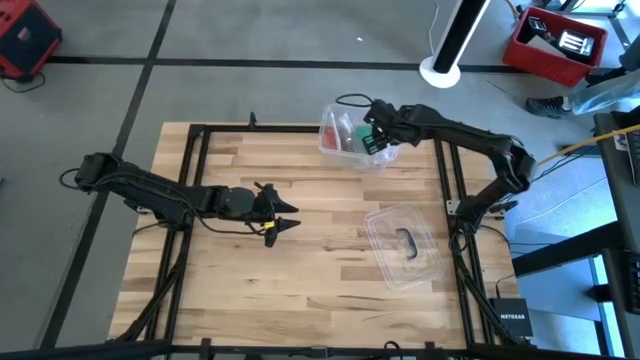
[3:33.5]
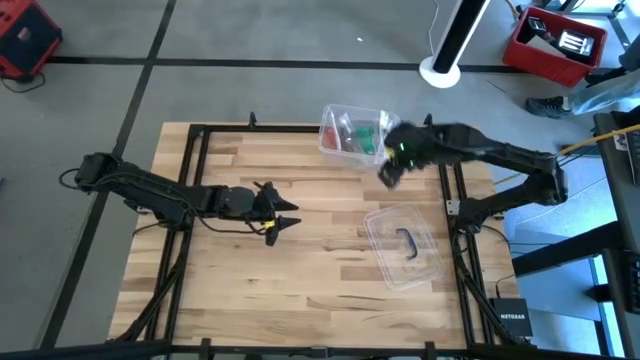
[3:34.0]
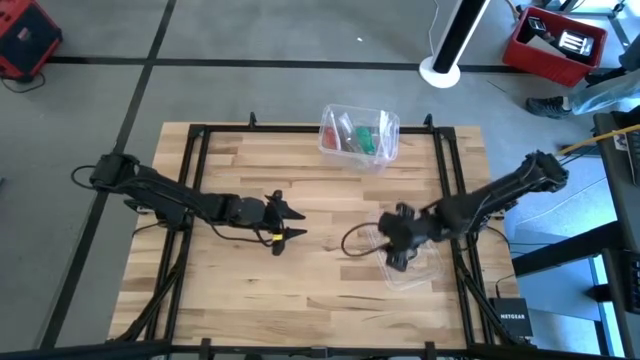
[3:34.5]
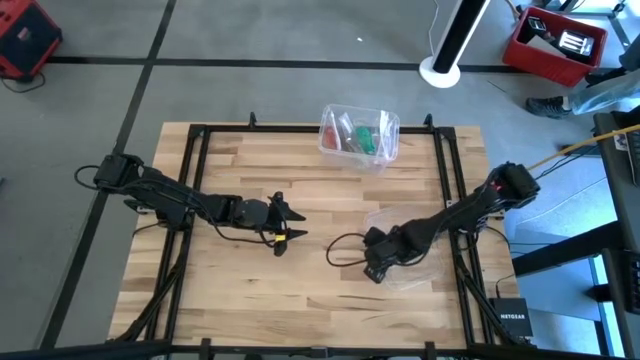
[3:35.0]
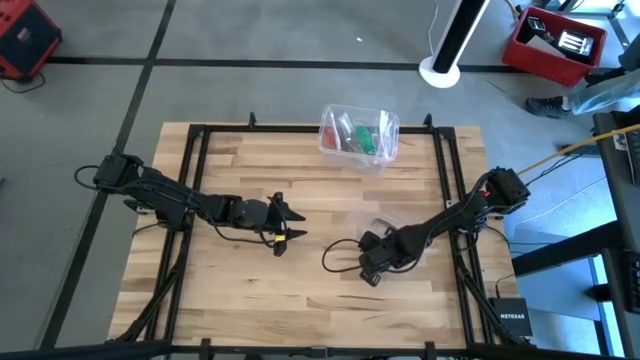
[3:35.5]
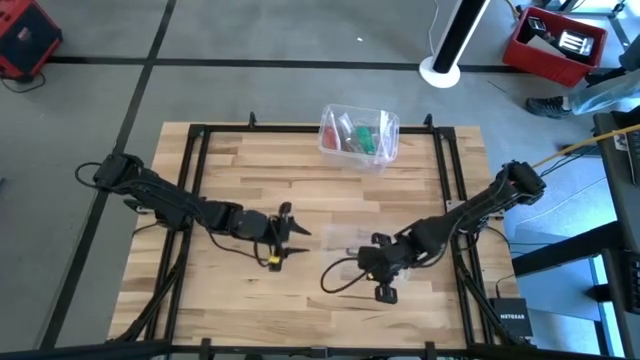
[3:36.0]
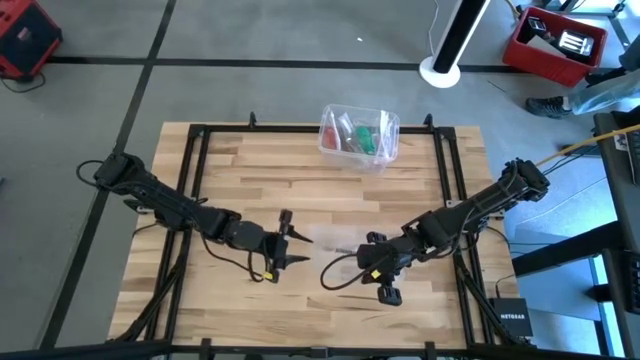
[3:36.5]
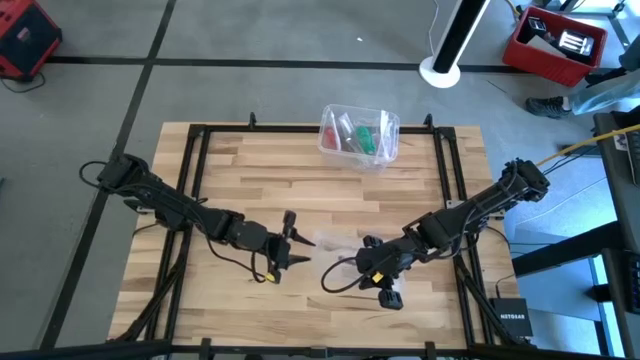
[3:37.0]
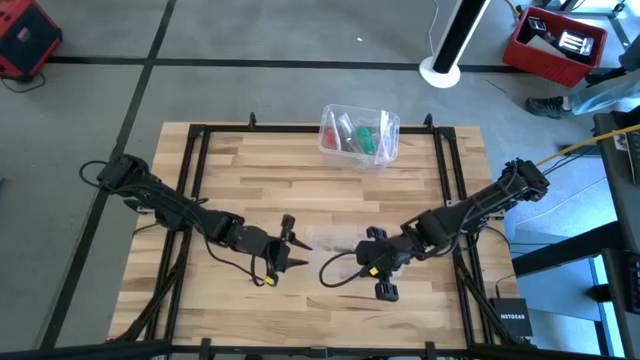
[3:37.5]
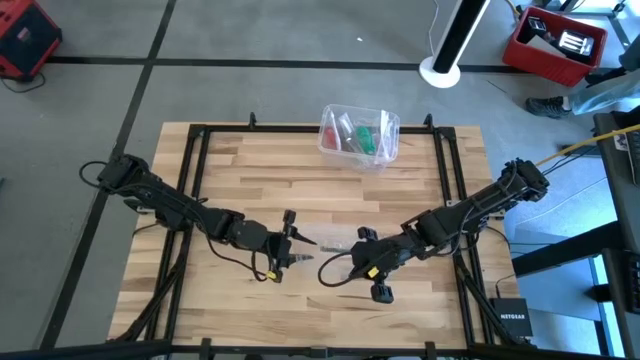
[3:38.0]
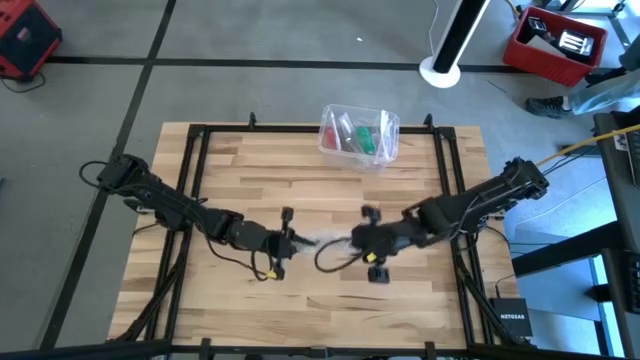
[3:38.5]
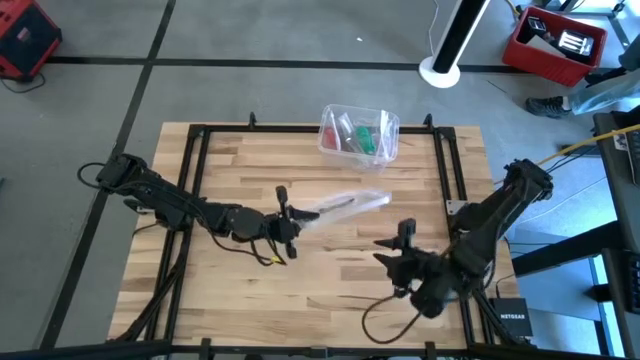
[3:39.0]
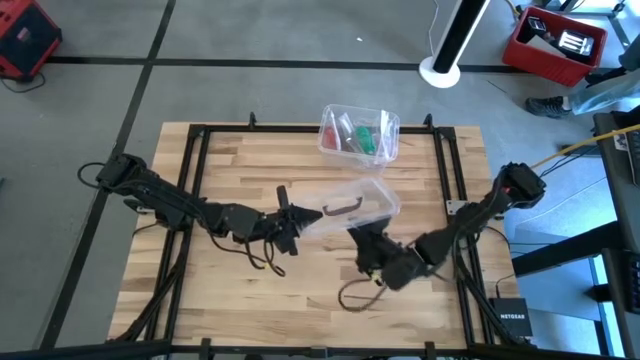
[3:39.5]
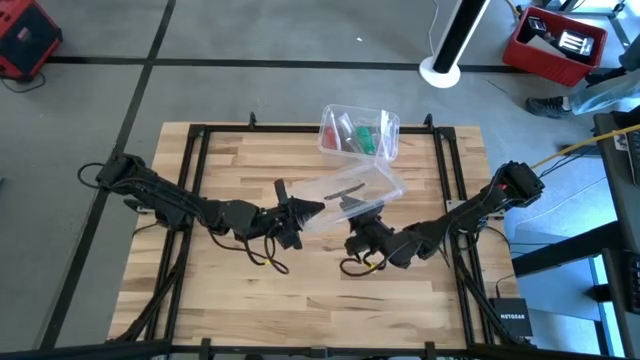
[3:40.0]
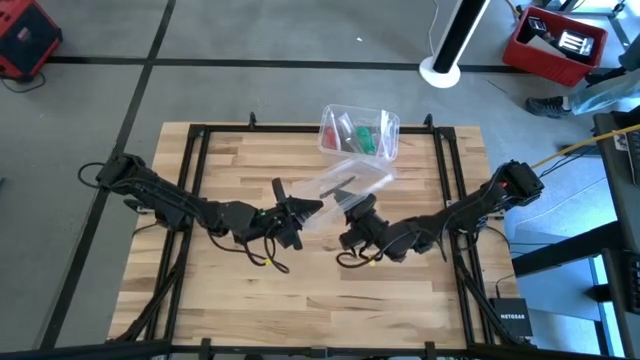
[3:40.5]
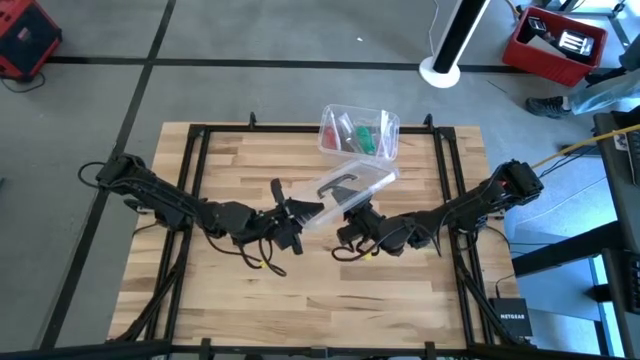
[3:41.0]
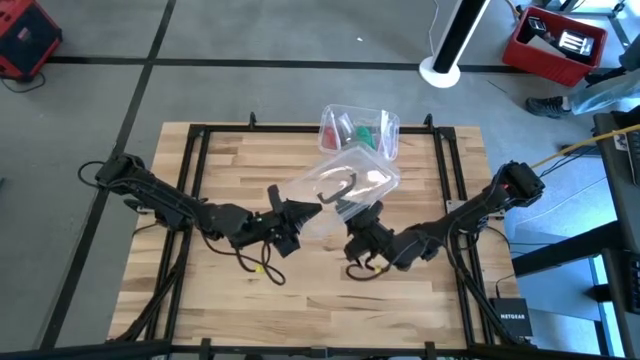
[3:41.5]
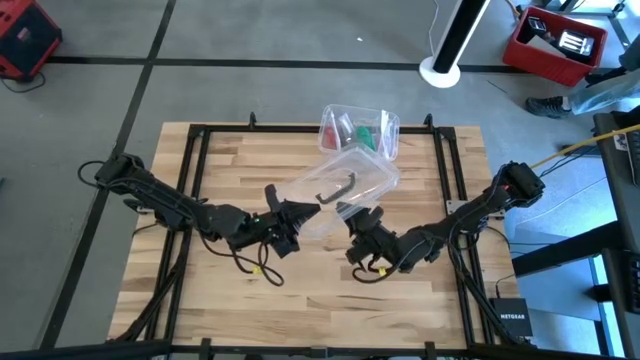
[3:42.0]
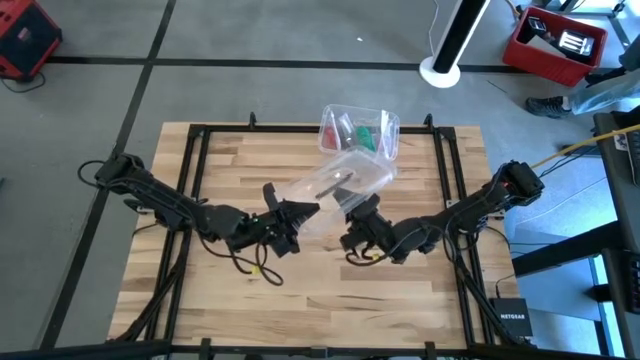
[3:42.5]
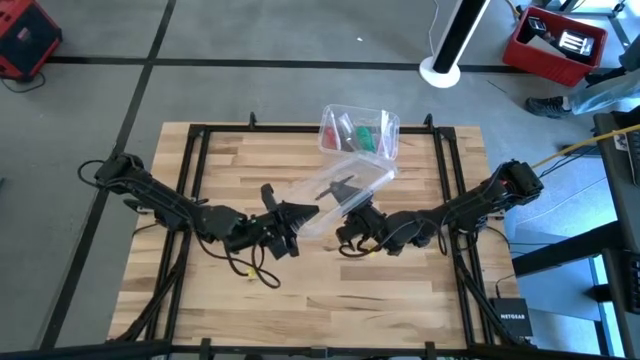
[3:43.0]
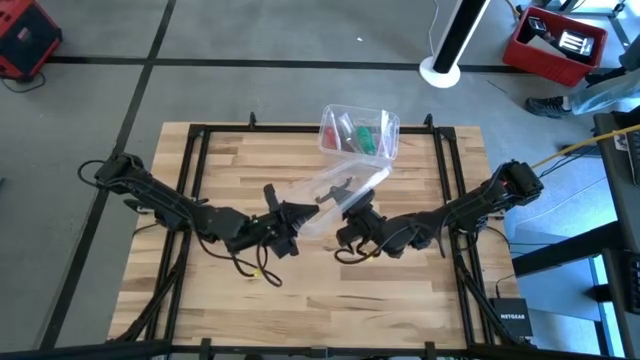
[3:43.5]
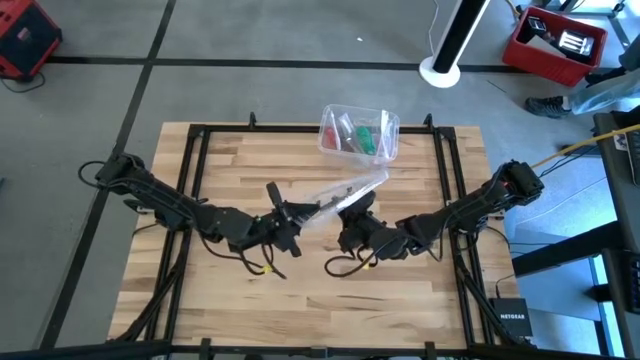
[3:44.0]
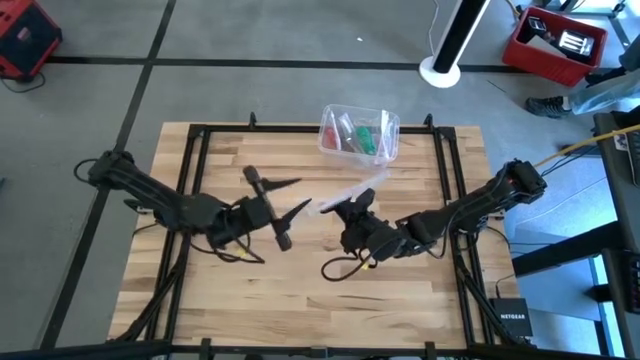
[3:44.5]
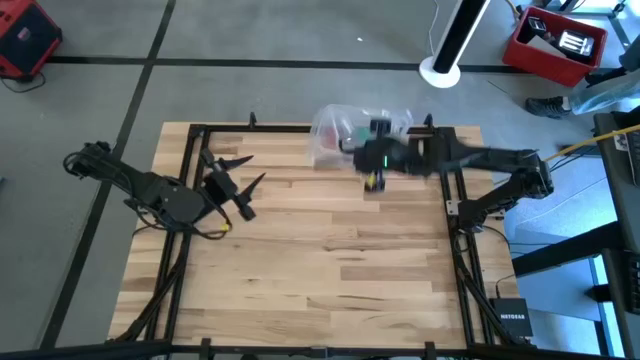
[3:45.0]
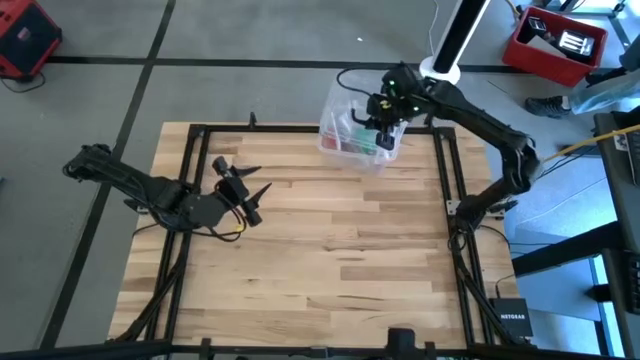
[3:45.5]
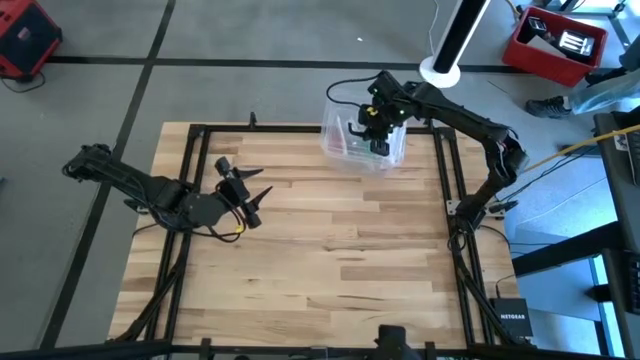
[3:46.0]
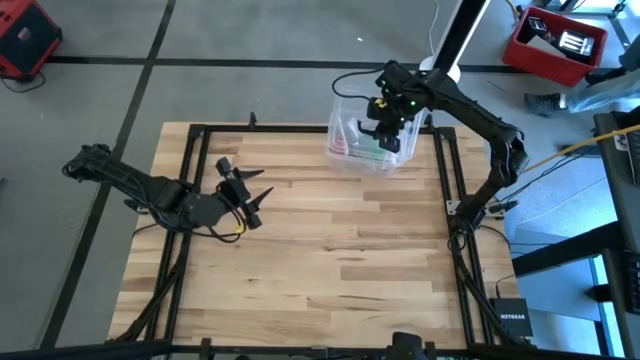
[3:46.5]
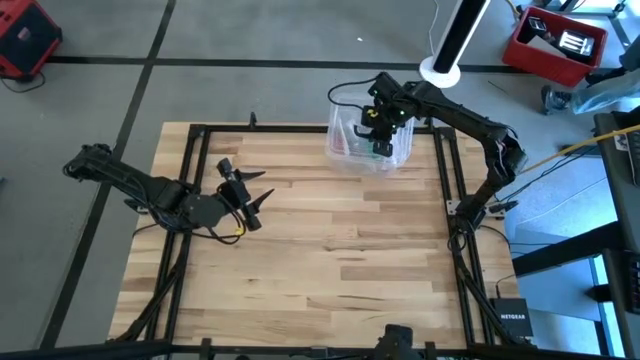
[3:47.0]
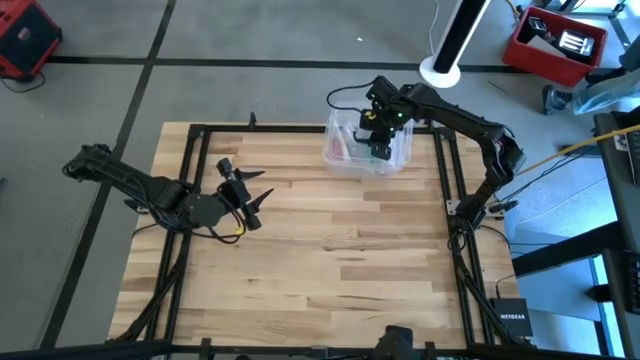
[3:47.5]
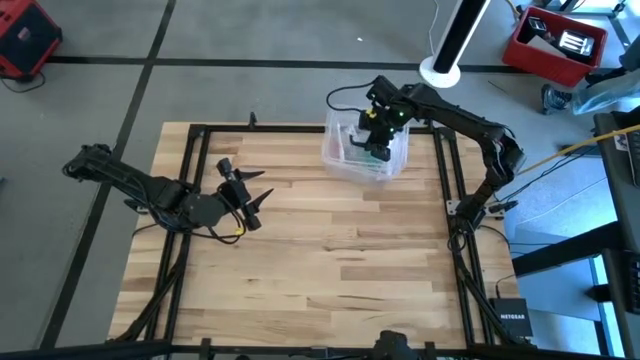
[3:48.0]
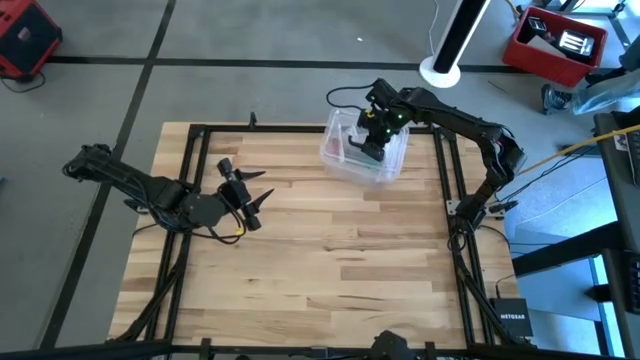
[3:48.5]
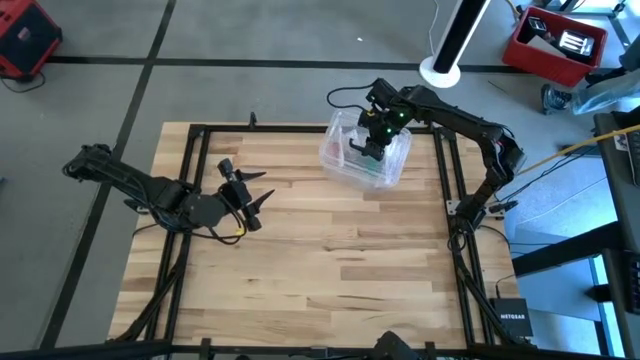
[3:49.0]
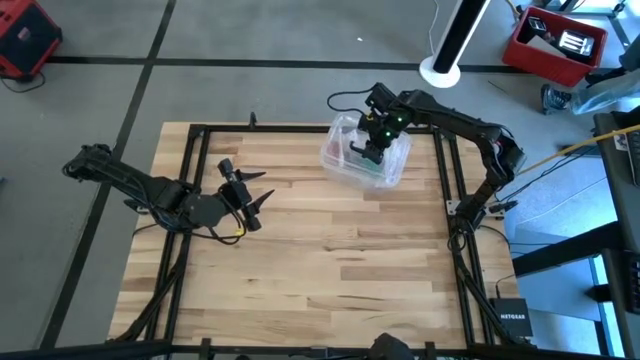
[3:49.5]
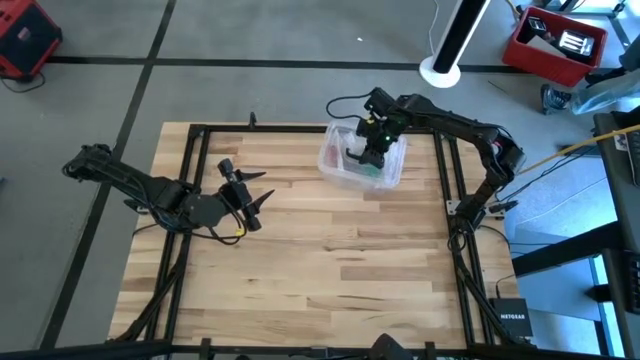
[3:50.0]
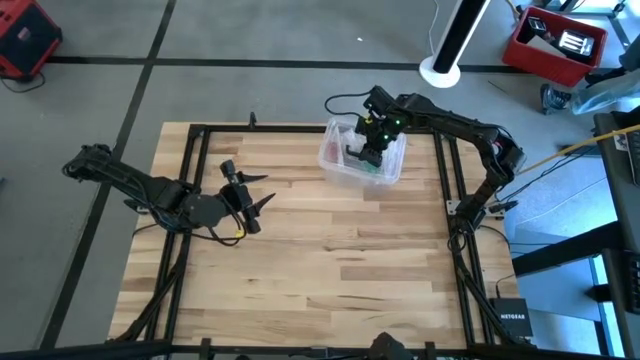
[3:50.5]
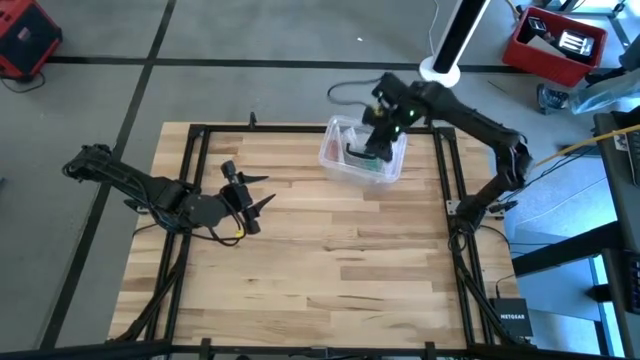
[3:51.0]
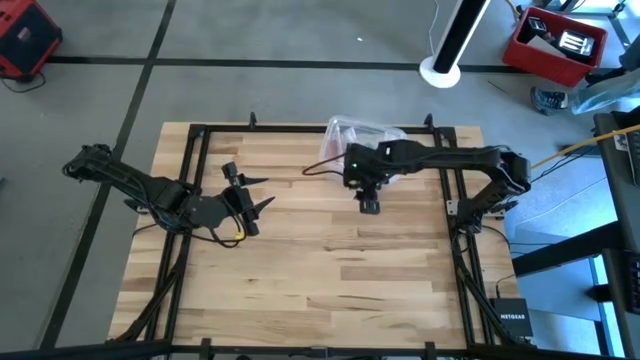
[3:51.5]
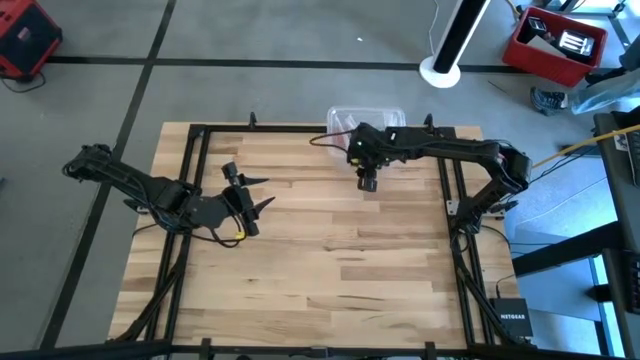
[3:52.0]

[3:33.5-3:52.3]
Task: Roll bandage
Close the transparent bin

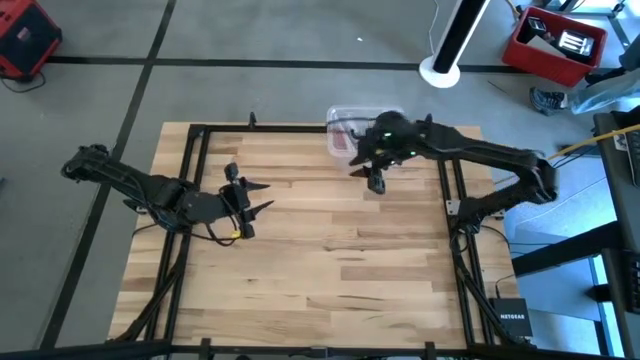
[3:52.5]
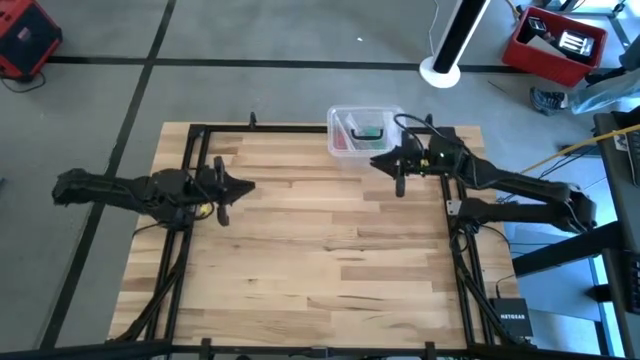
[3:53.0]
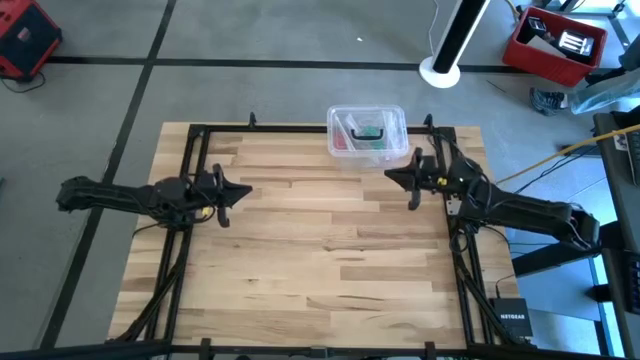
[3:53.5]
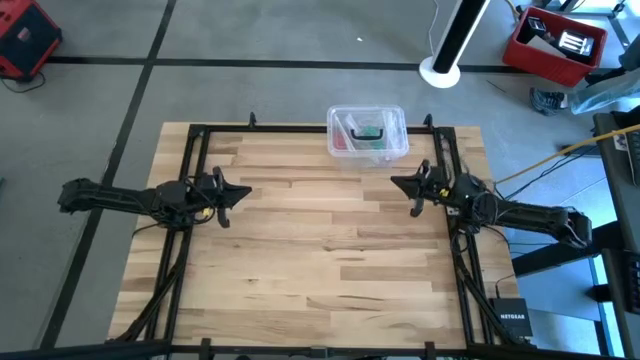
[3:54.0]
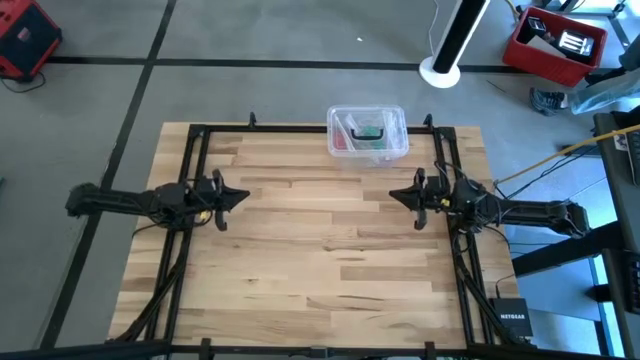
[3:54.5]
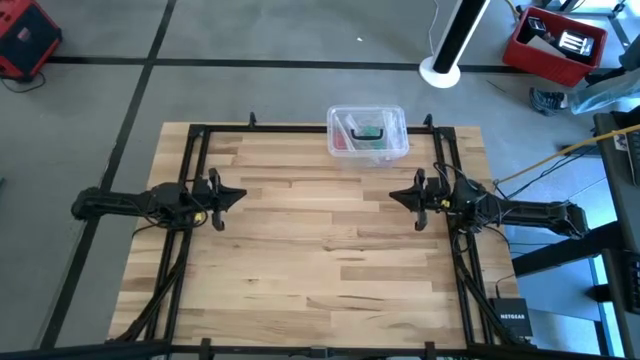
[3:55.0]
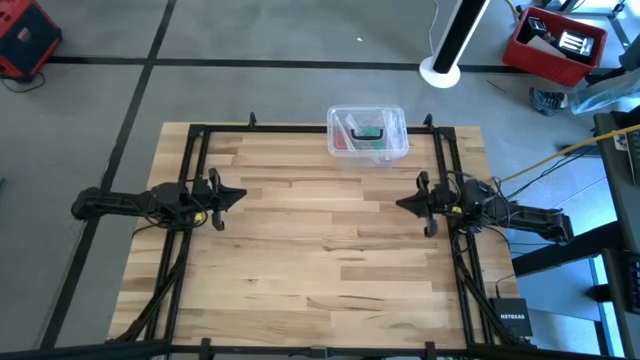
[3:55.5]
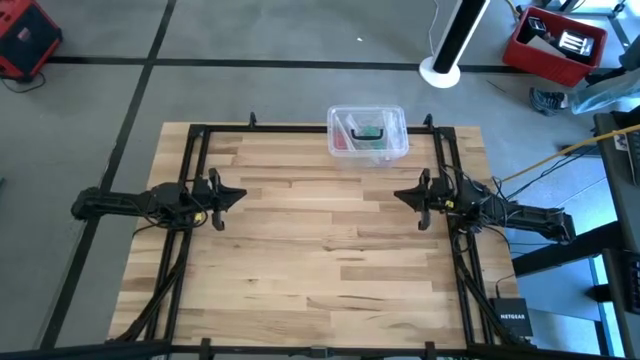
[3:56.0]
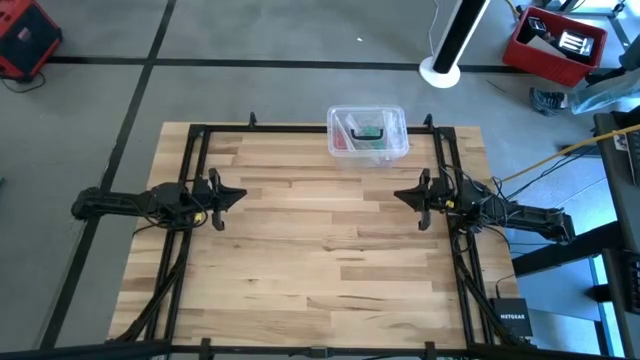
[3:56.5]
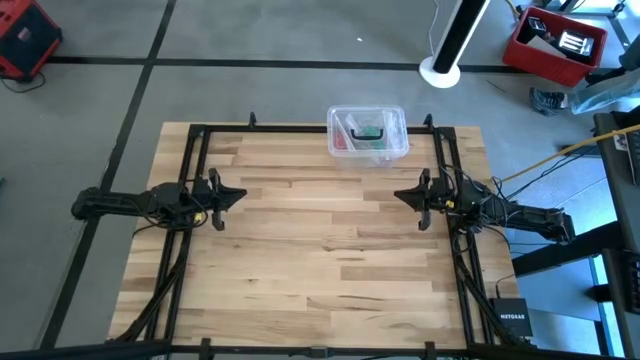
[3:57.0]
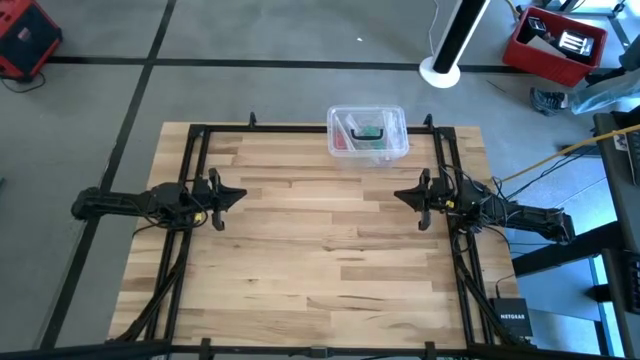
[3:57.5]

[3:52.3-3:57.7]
Return to Home Position
